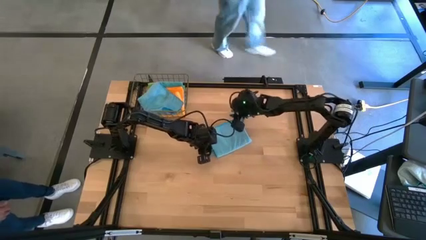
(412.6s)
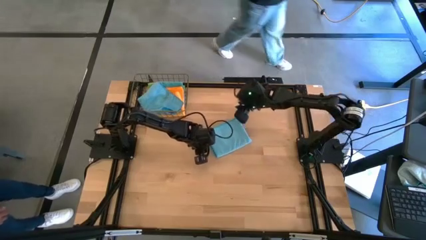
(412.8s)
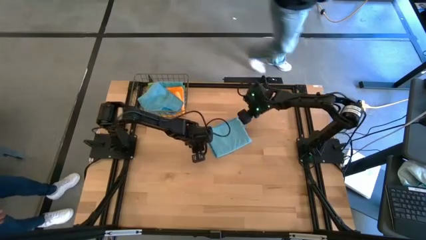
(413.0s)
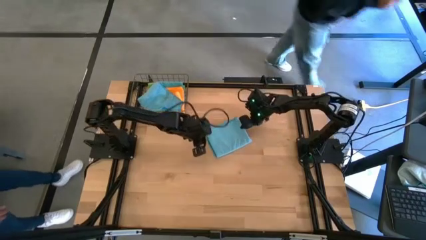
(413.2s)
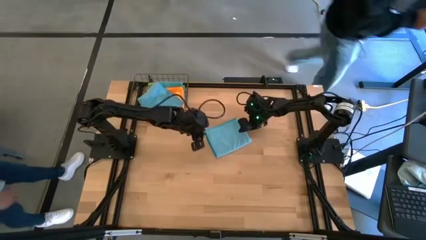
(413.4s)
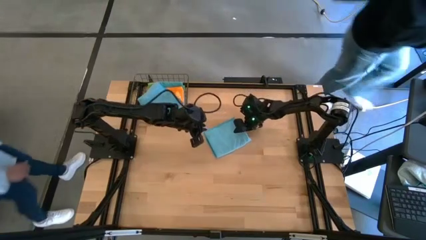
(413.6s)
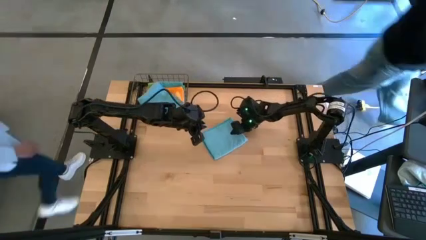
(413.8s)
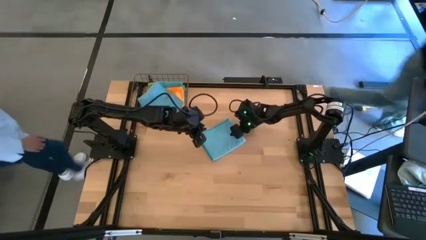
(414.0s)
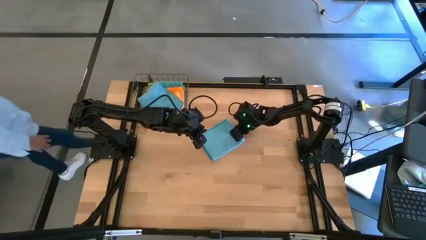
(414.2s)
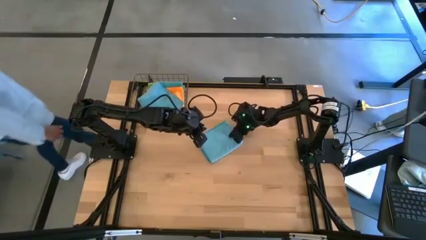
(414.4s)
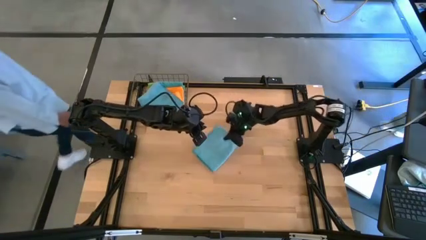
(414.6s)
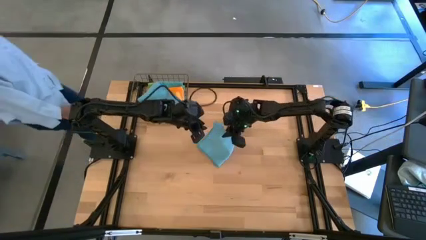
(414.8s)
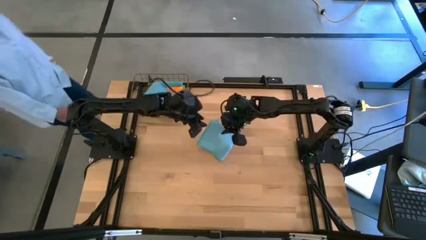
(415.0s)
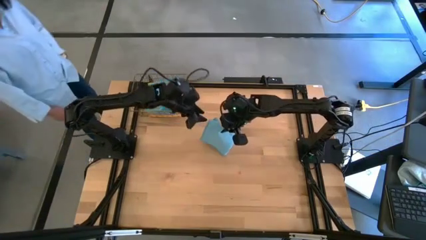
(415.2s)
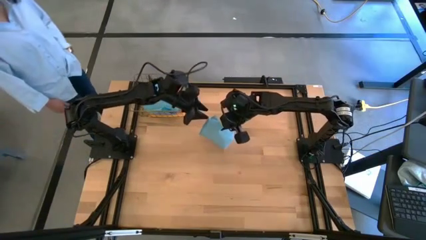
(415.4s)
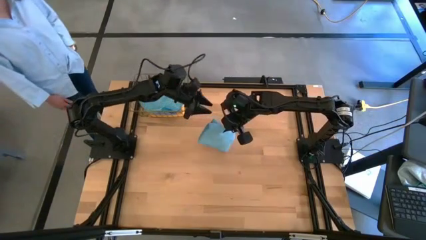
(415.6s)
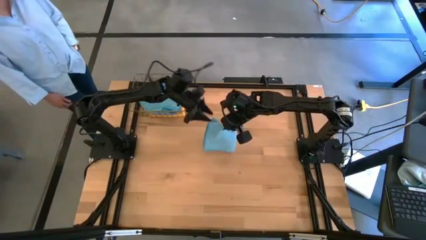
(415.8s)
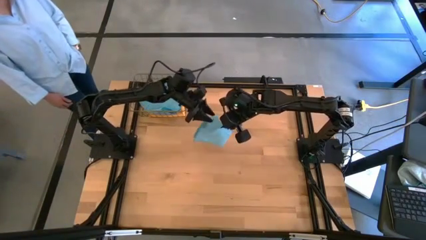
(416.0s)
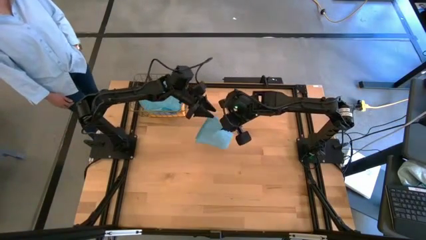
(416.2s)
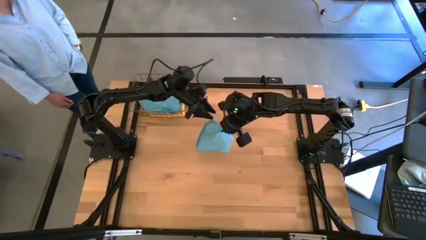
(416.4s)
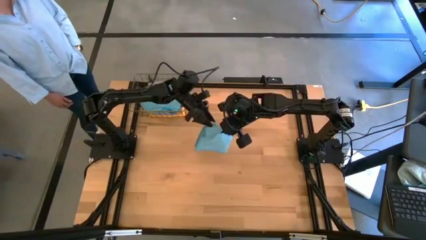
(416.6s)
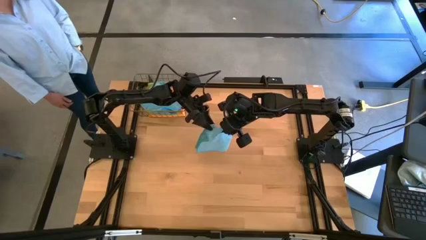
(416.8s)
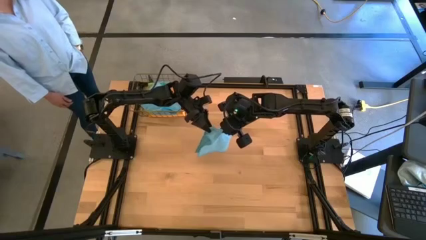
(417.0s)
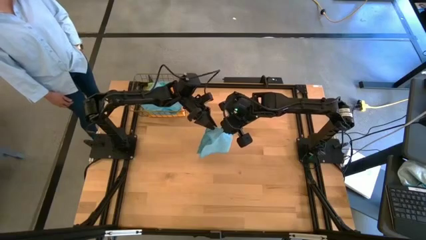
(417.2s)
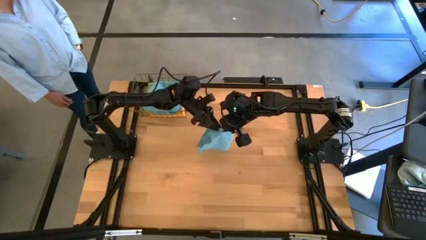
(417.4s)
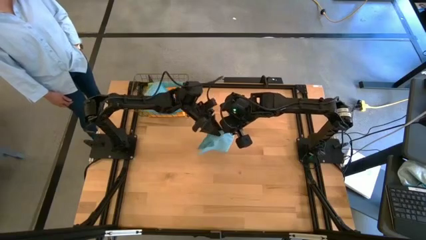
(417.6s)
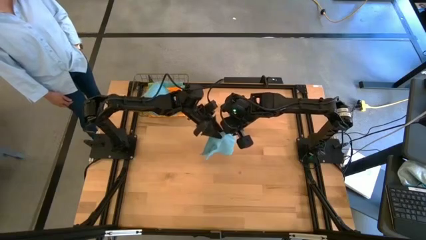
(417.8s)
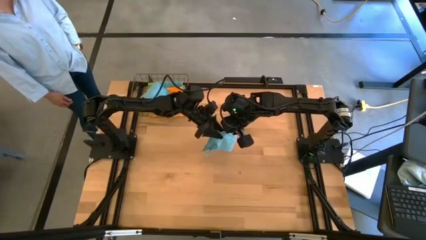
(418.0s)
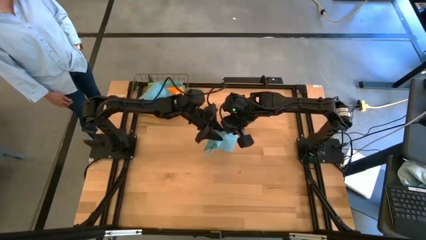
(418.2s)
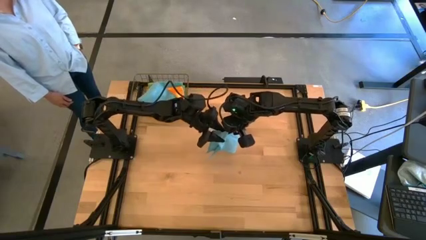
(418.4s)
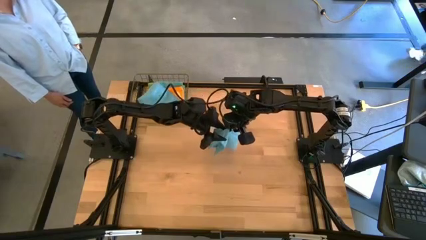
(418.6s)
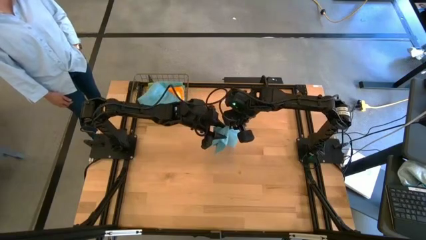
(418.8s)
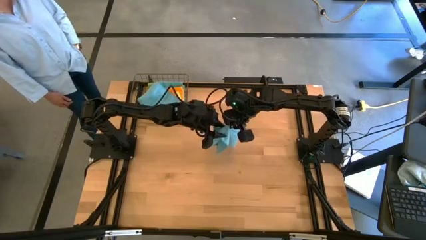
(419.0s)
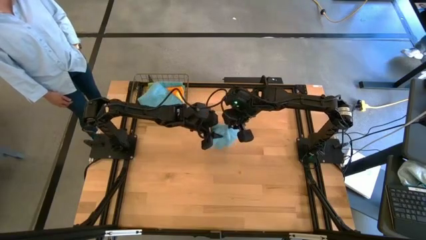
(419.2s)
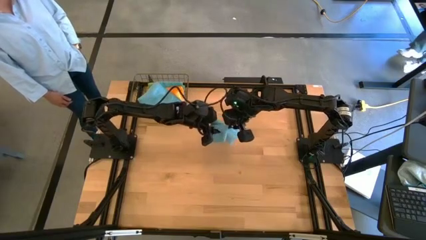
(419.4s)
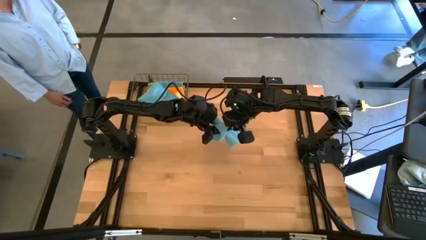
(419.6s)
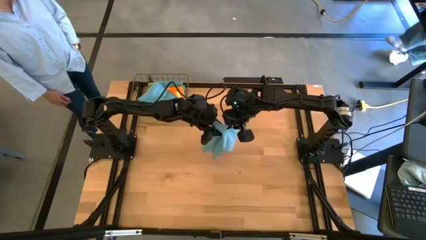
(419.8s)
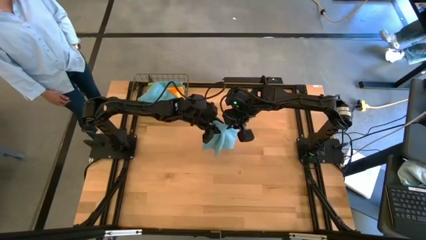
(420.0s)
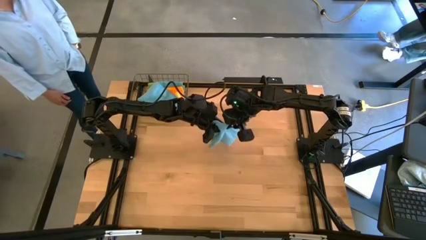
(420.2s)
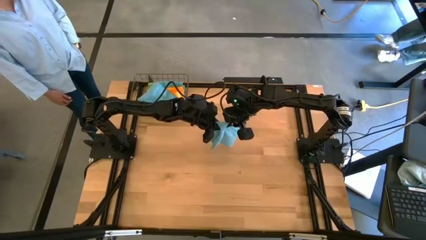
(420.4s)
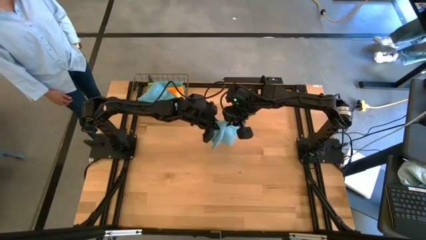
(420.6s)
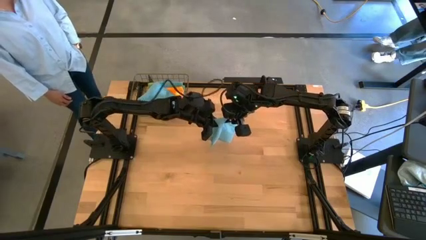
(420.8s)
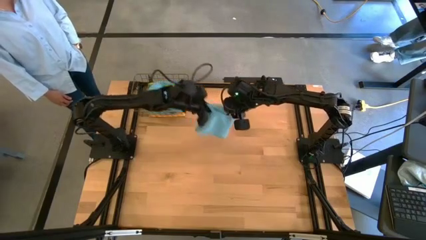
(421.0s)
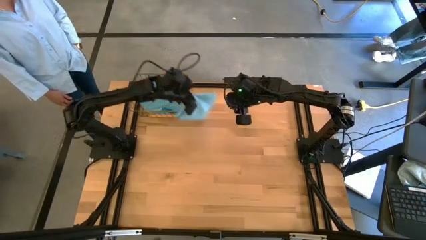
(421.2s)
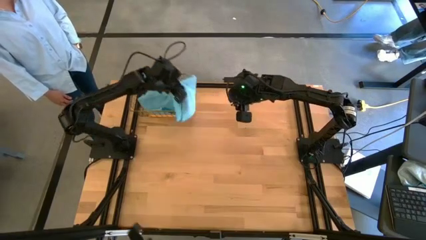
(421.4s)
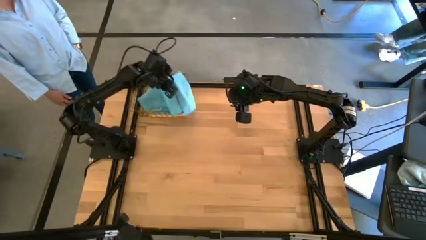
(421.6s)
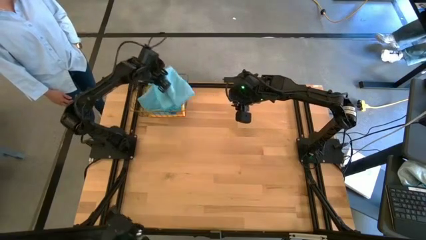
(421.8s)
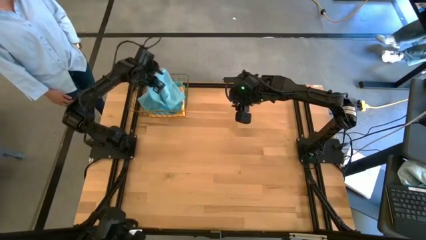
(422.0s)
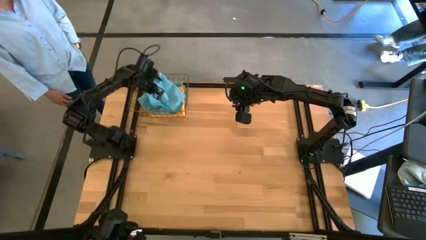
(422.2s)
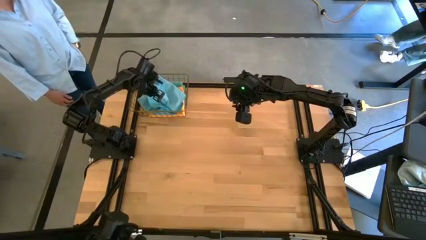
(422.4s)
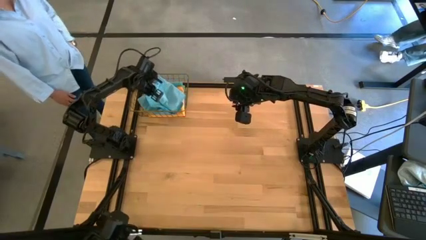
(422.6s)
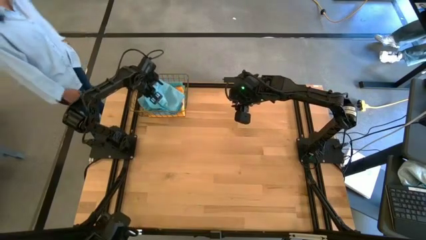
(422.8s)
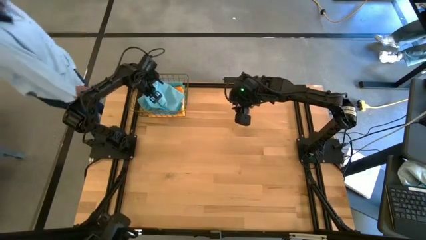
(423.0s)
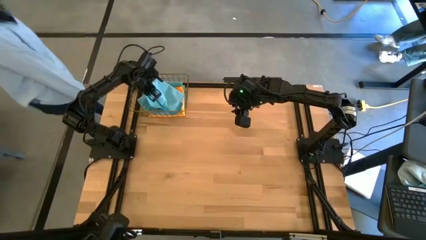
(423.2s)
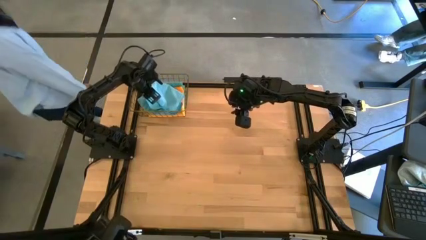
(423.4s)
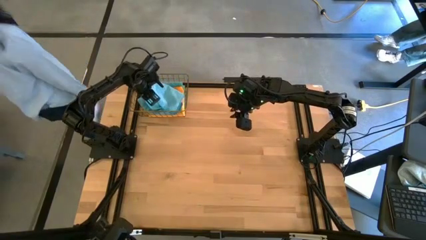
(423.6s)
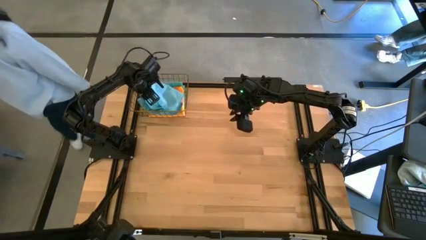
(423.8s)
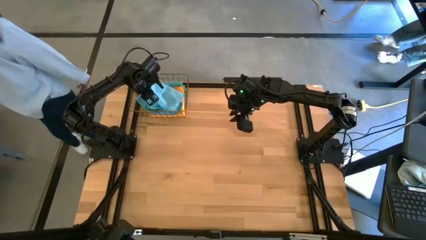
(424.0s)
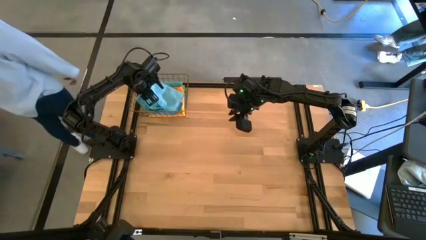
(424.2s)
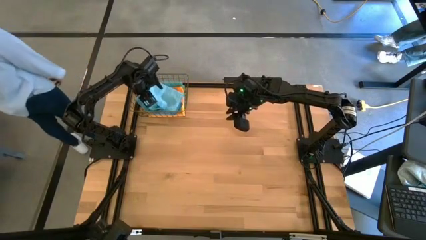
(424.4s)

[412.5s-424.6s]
Task: Fold microfiber towels
Put the folded light blue microfiber cloth into the wire basket

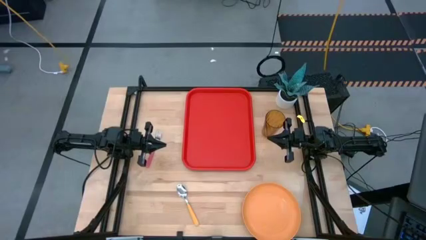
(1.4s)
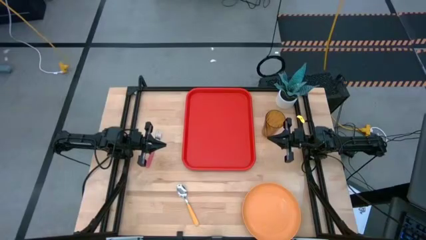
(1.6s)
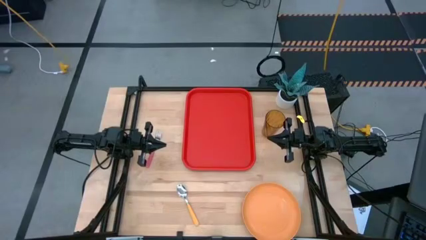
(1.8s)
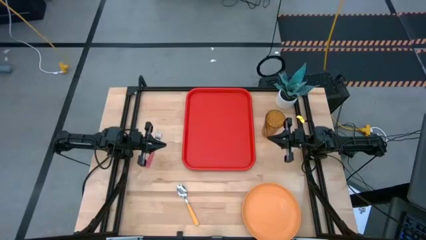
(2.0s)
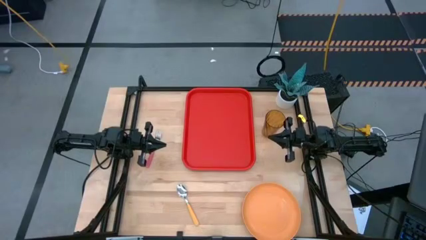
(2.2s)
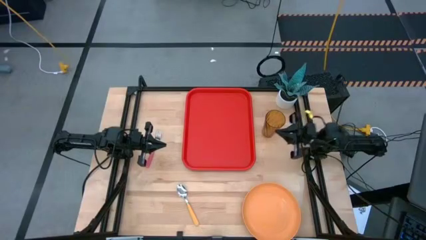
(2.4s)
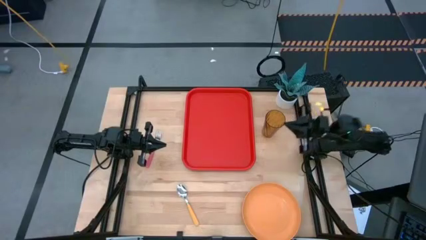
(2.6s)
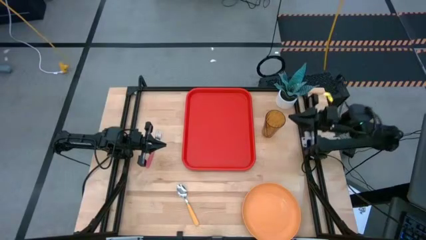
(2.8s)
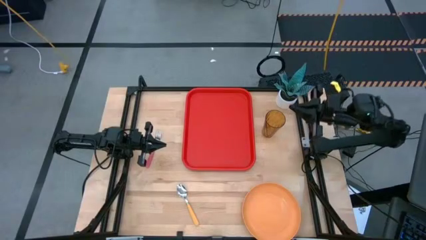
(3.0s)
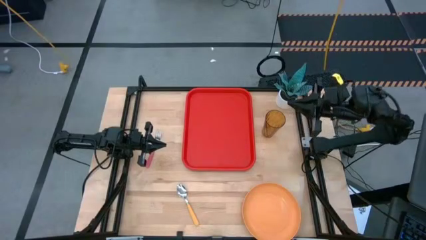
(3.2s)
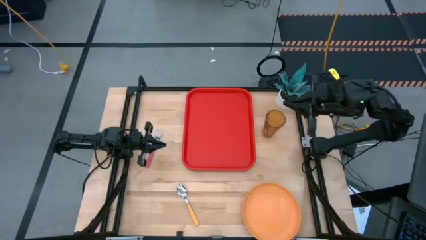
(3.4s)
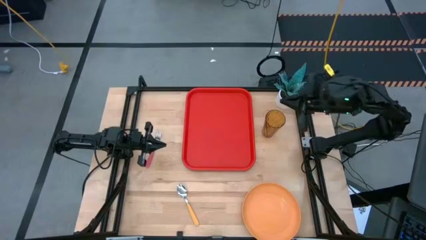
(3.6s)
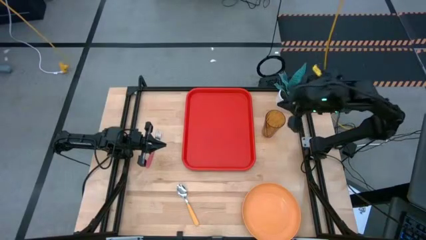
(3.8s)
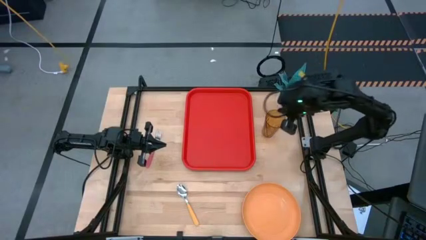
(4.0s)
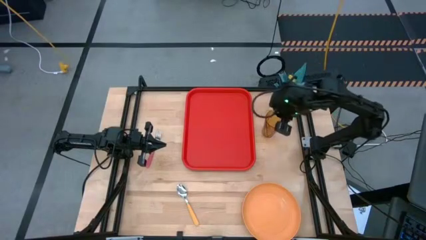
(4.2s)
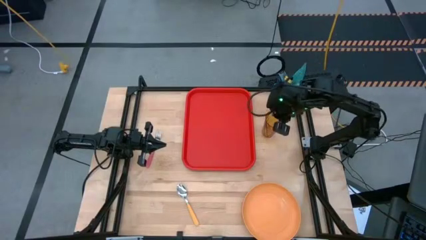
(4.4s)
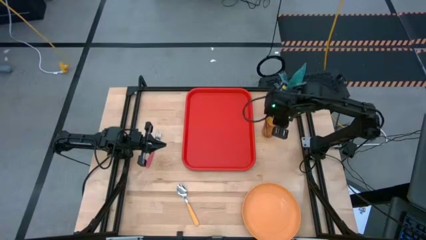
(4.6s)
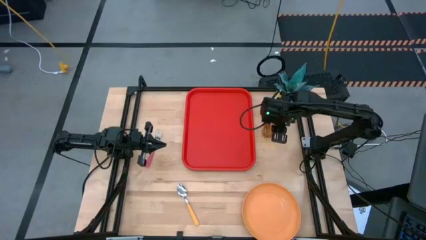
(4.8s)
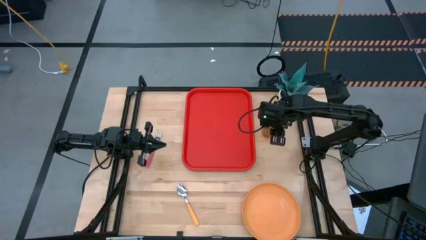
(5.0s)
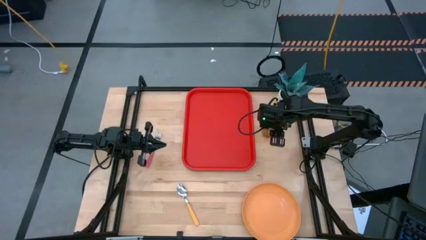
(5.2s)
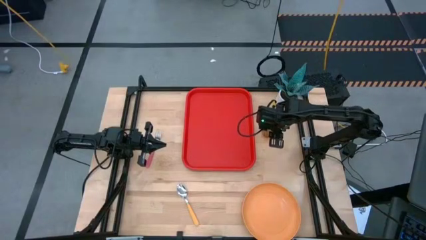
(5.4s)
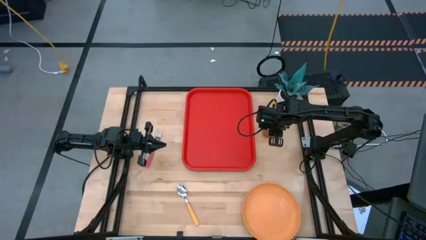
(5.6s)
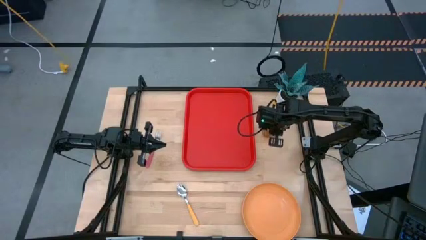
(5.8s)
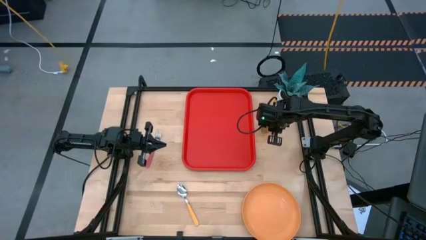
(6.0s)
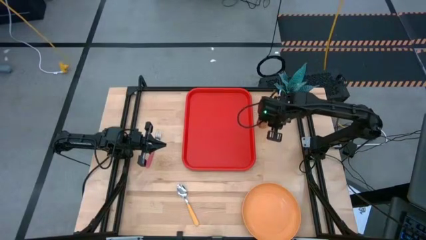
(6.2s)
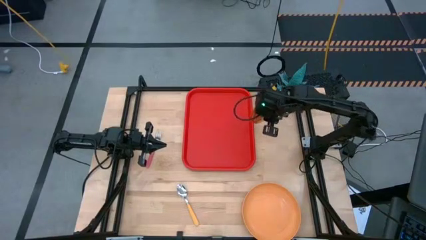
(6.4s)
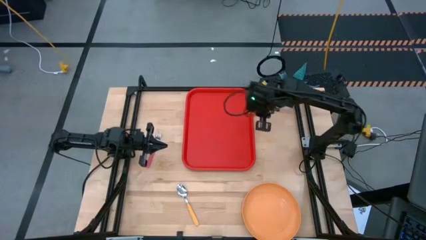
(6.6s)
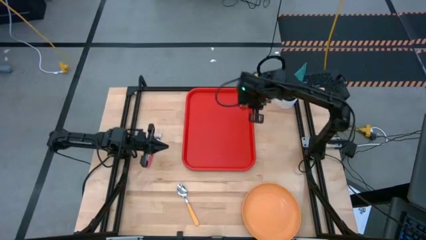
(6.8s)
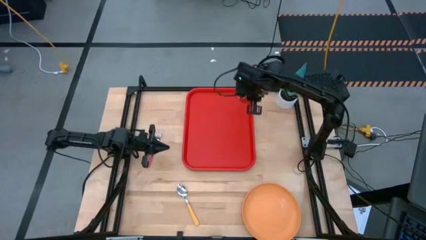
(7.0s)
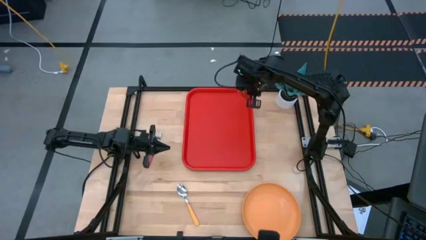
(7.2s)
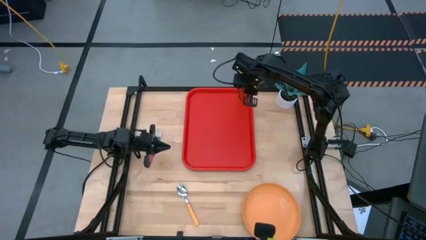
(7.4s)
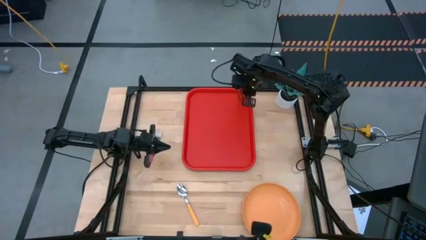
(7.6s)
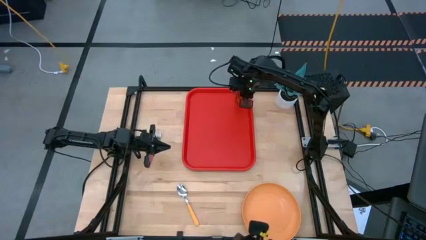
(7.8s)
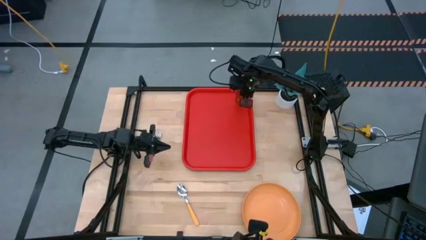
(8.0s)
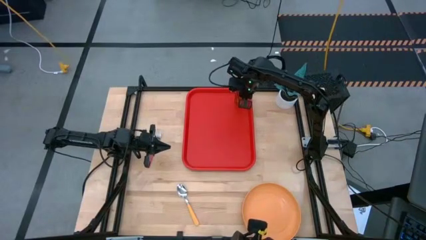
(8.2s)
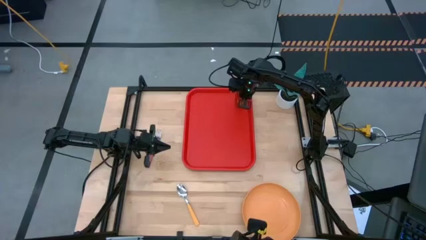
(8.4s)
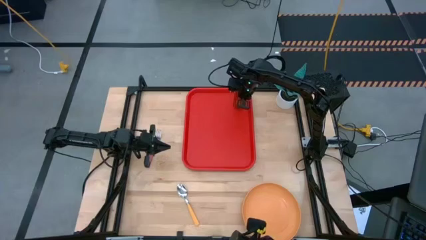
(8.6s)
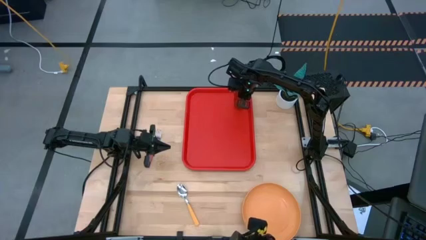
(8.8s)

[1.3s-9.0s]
Task: Pick and place plate/cup/fork/spoon on tray
Put the yellow cup on the red serving tray
